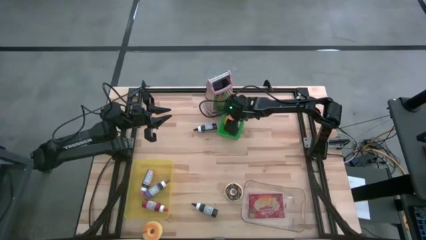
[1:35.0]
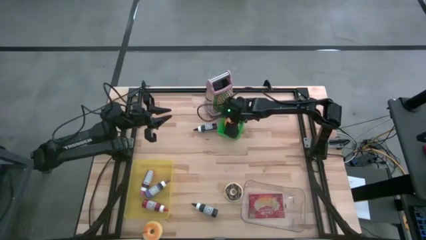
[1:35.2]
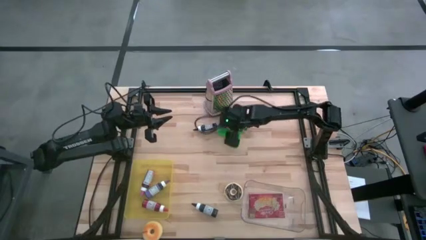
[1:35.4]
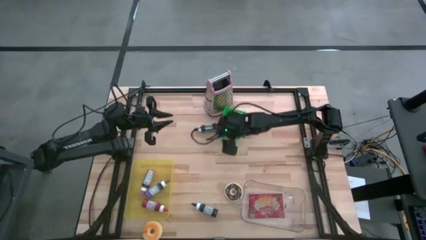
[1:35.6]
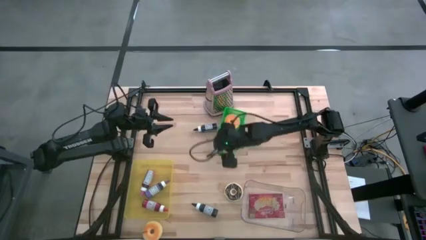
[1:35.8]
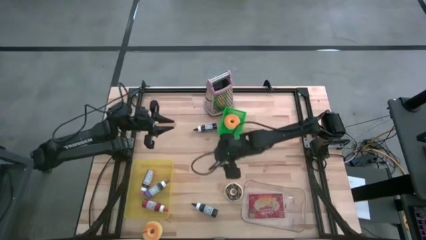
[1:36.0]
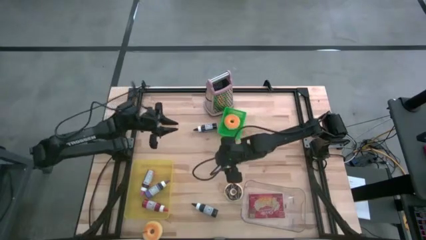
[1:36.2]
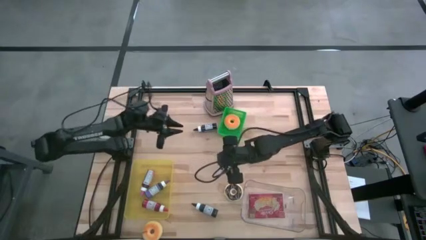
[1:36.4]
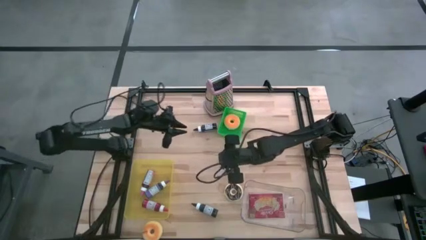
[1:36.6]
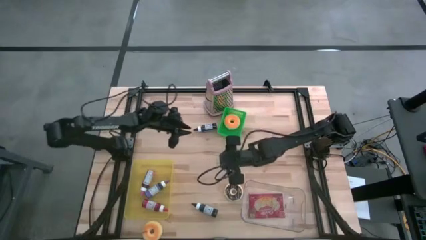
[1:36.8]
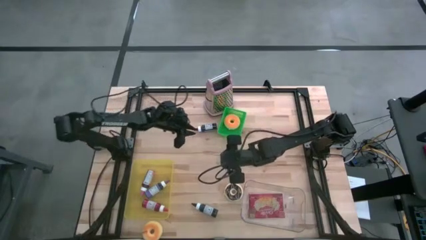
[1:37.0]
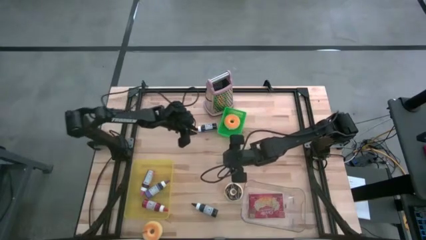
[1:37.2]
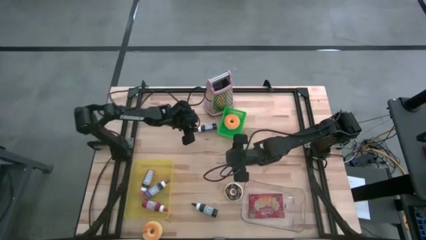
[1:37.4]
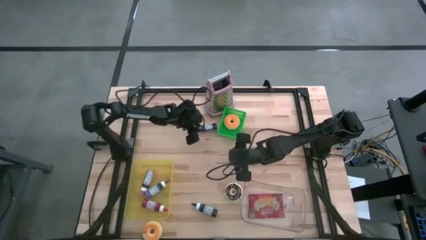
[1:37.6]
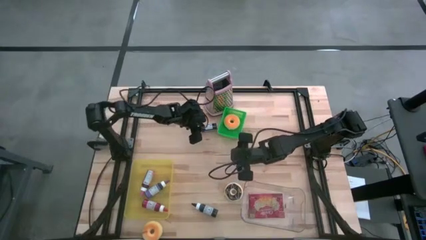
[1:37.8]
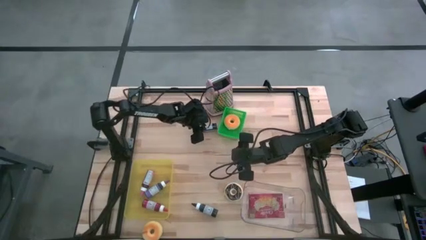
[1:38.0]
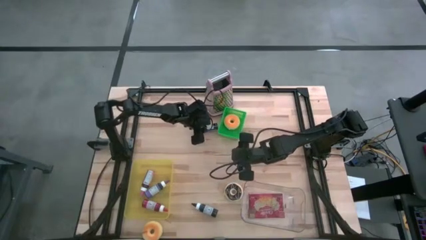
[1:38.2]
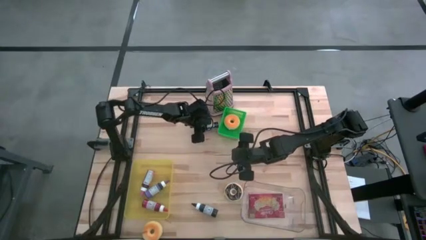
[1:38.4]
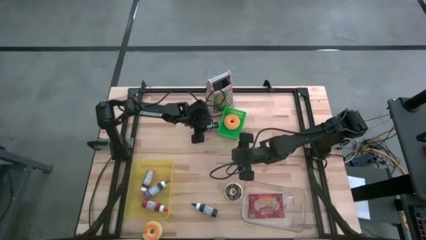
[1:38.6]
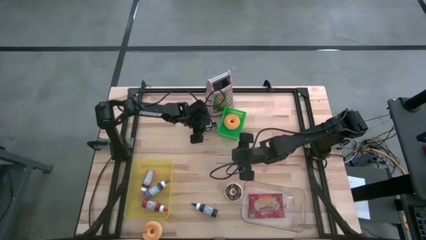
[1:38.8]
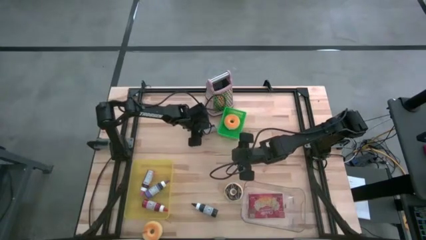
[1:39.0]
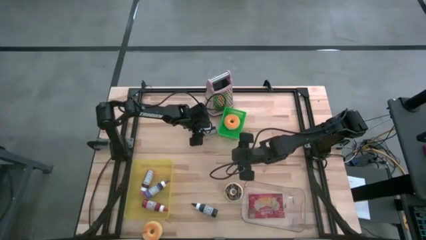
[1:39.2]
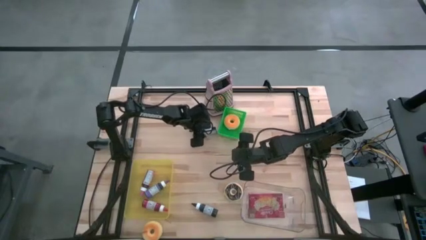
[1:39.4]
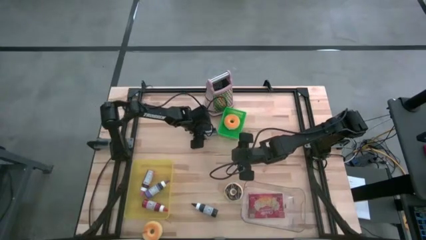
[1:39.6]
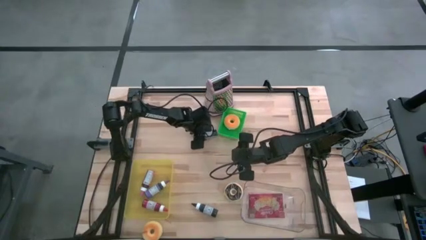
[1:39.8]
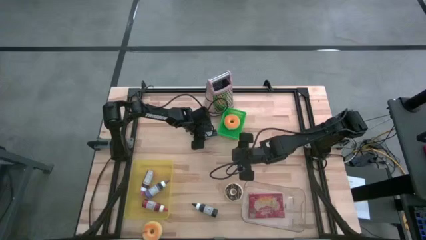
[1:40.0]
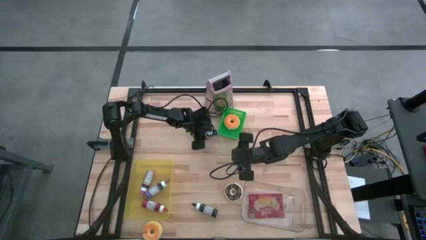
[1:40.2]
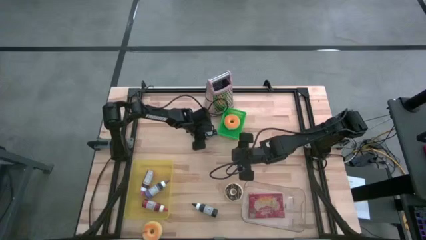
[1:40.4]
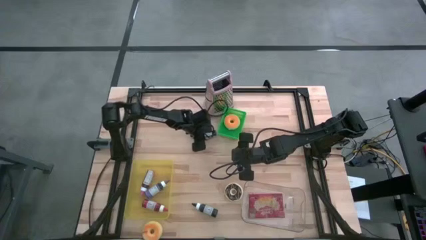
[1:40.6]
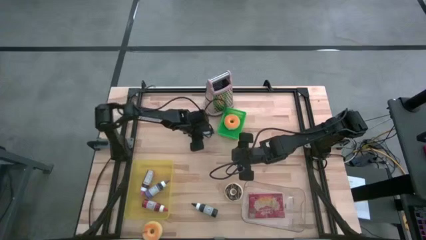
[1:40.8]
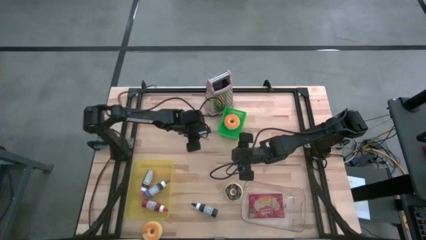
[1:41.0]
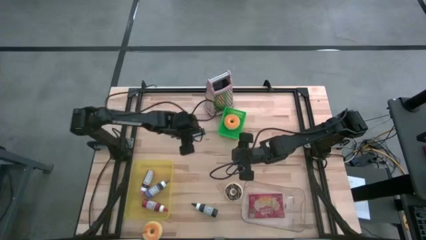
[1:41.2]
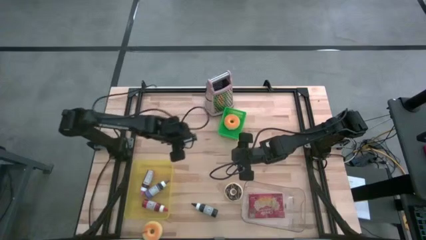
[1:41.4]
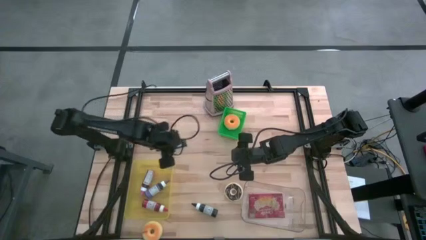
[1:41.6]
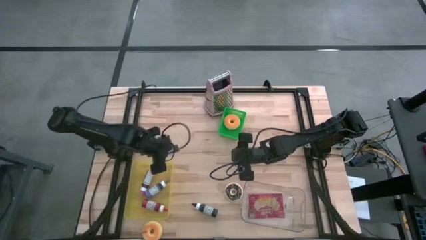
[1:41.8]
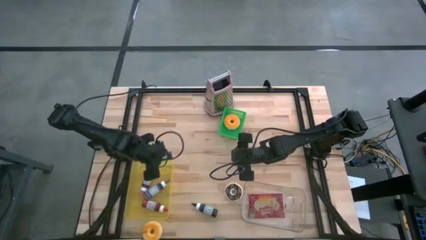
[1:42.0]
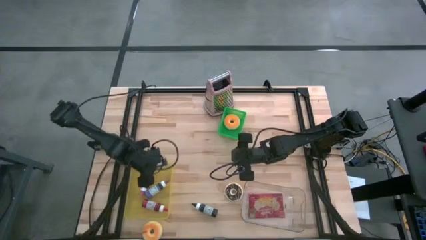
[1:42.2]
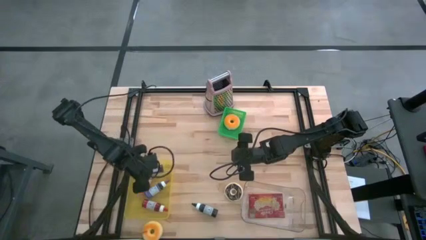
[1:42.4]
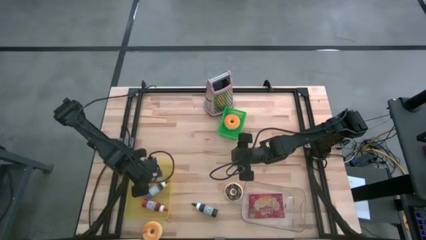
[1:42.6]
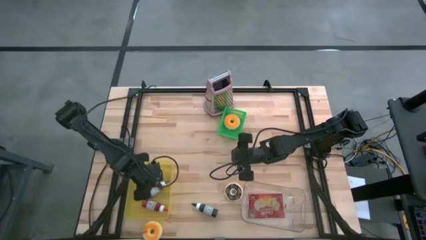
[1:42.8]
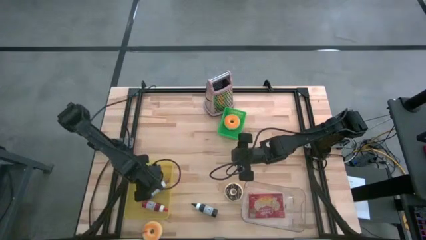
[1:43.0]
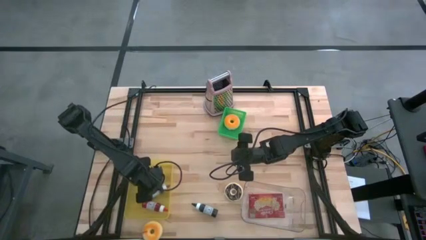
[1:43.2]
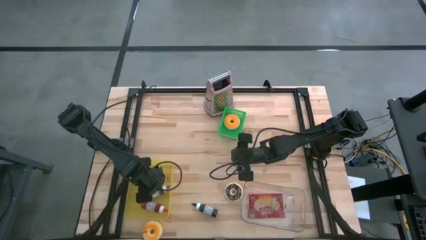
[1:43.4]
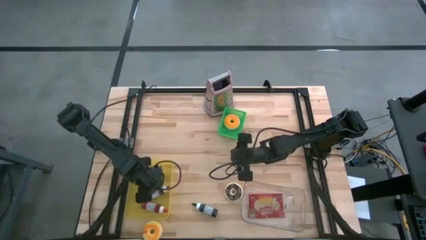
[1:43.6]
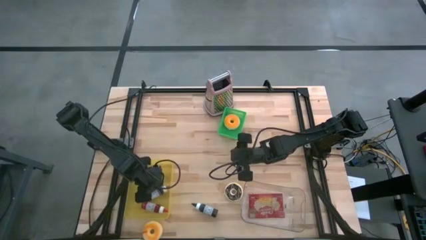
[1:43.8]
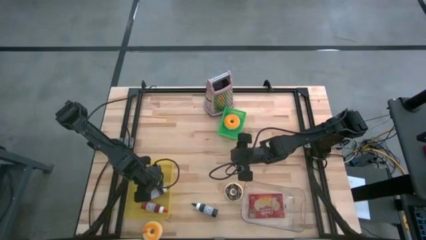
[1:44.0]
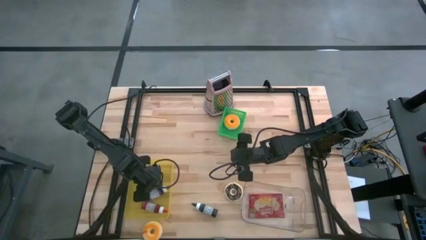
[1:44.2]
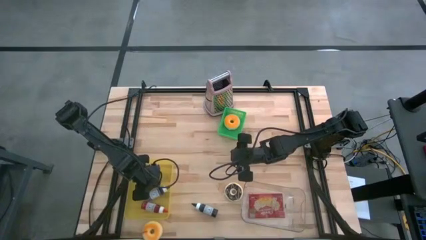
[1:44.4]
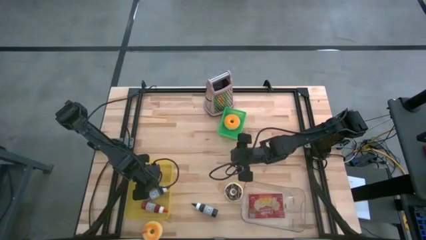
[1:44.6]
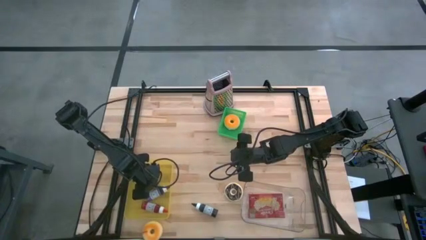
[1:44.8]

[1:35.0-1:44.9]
Task: Pick & Place Food Item
Put the black ink bottle into the yellow bin

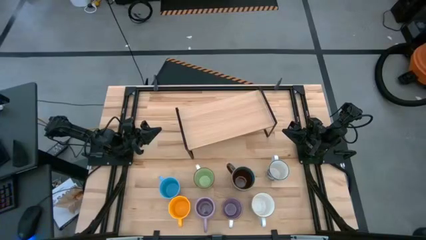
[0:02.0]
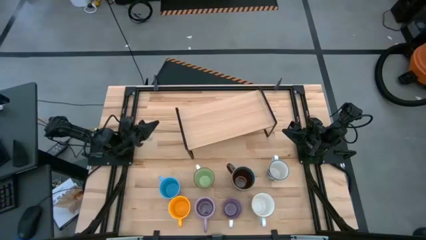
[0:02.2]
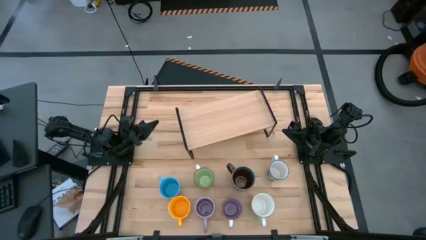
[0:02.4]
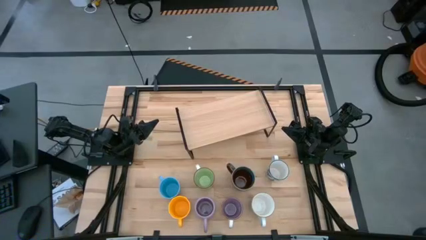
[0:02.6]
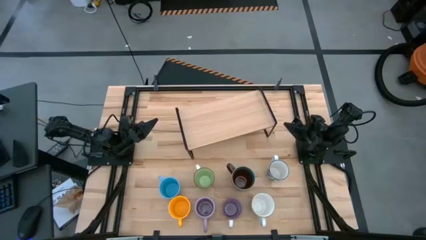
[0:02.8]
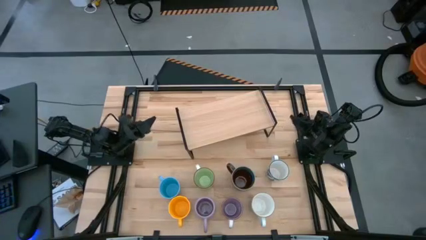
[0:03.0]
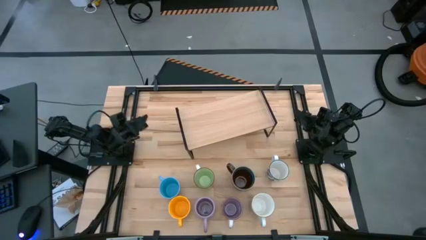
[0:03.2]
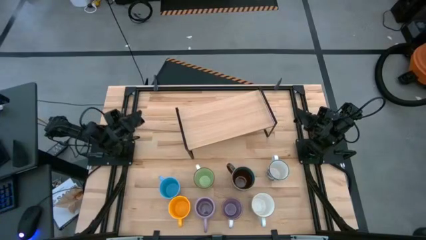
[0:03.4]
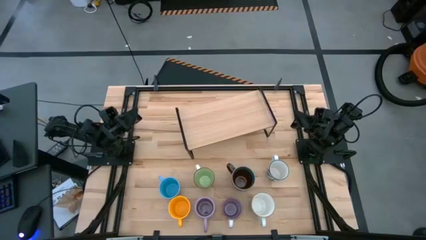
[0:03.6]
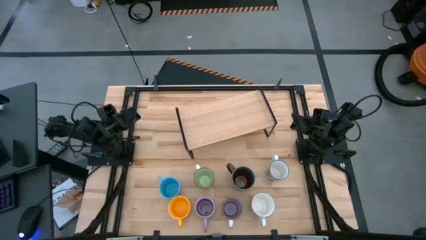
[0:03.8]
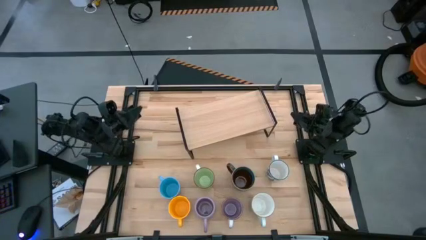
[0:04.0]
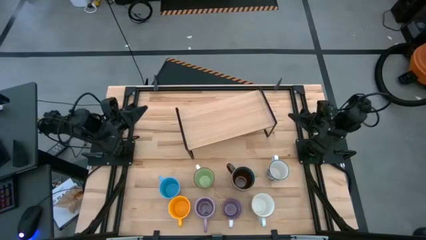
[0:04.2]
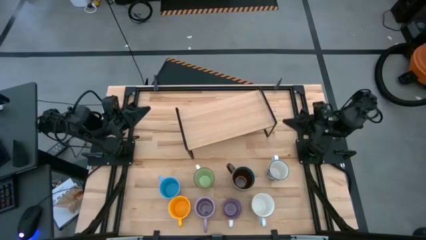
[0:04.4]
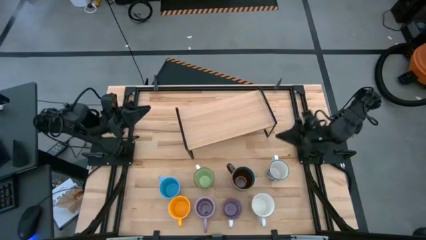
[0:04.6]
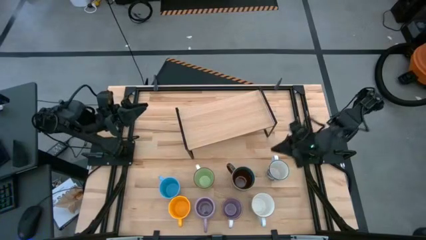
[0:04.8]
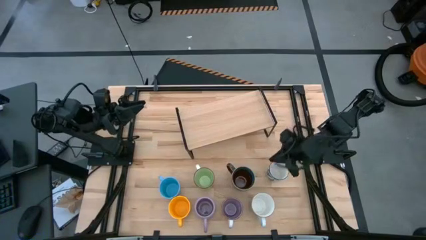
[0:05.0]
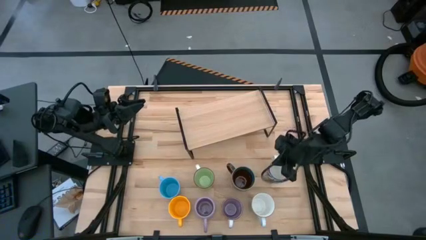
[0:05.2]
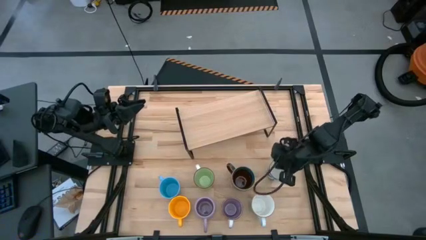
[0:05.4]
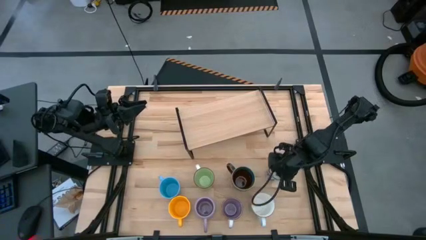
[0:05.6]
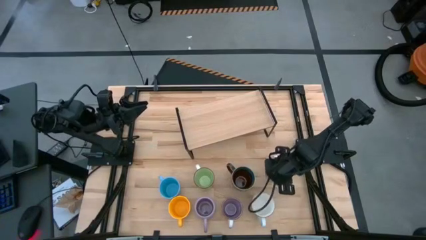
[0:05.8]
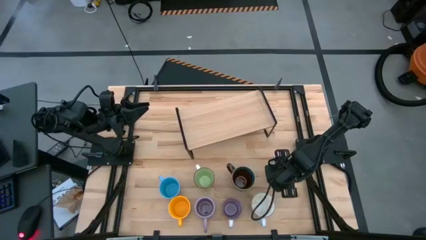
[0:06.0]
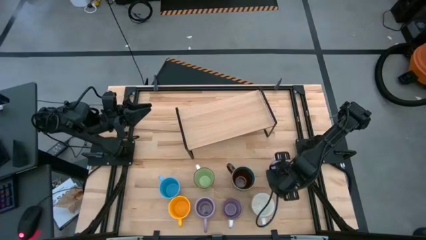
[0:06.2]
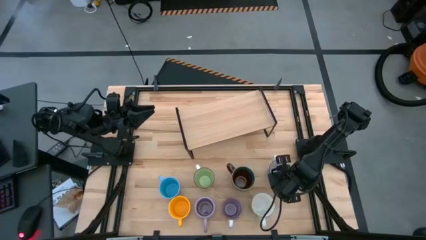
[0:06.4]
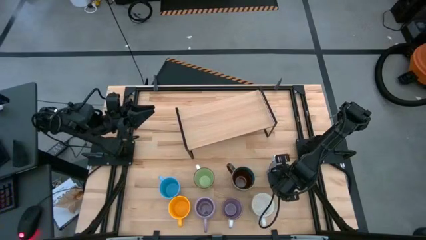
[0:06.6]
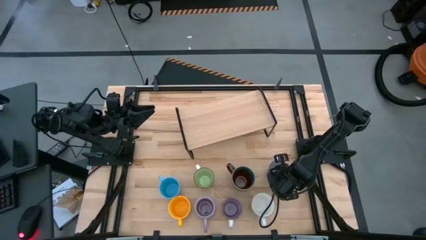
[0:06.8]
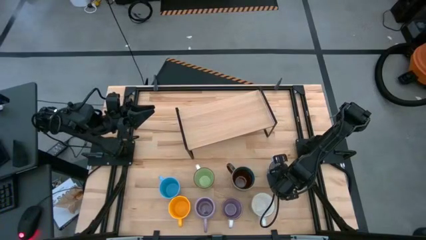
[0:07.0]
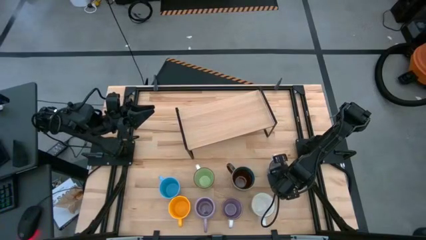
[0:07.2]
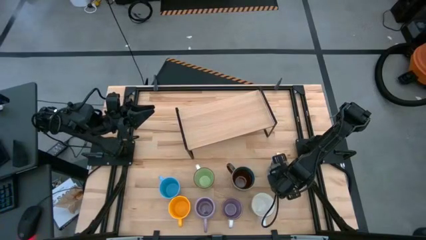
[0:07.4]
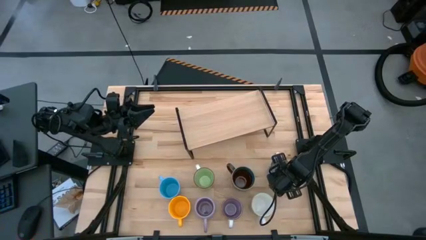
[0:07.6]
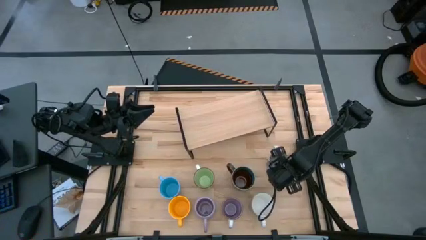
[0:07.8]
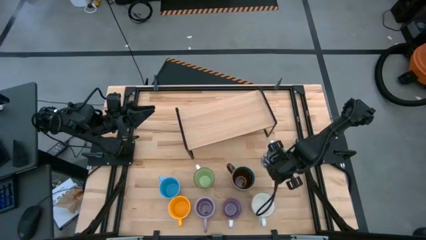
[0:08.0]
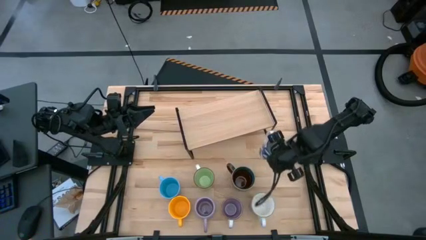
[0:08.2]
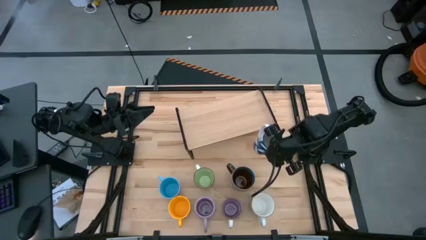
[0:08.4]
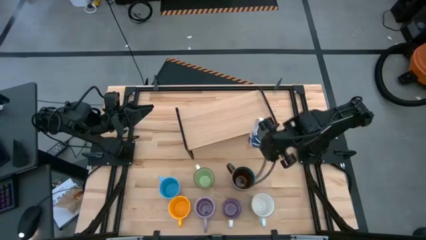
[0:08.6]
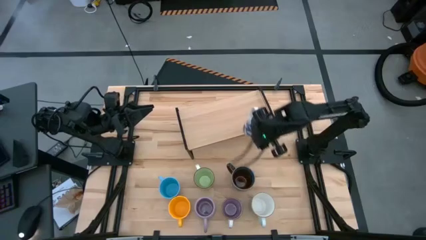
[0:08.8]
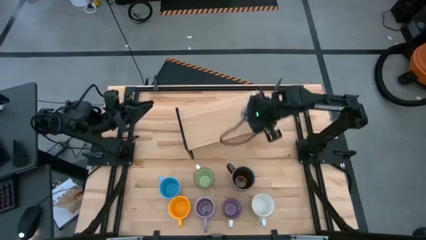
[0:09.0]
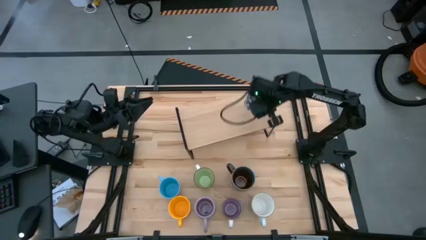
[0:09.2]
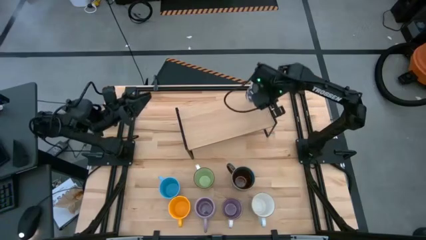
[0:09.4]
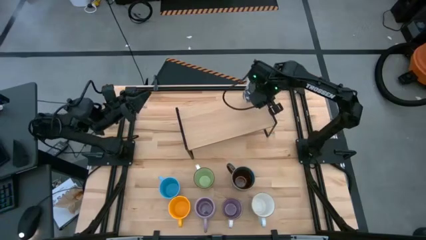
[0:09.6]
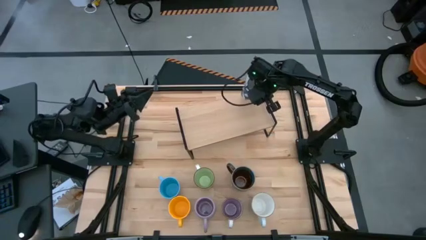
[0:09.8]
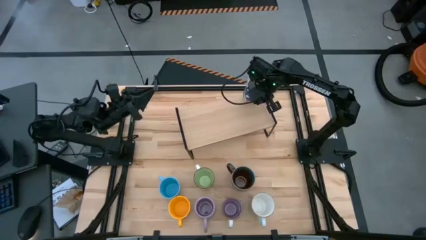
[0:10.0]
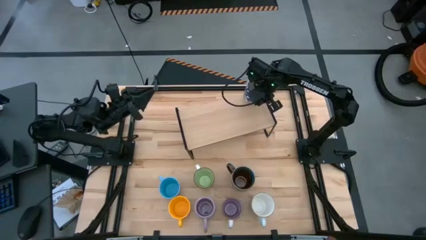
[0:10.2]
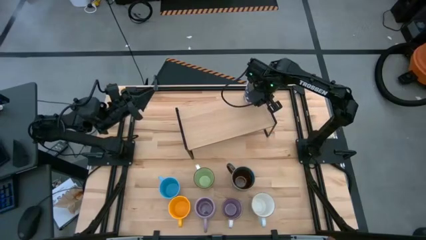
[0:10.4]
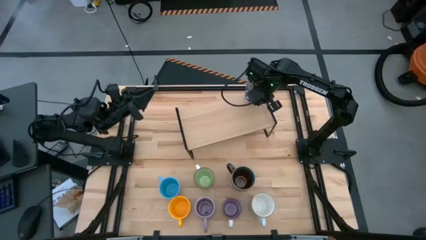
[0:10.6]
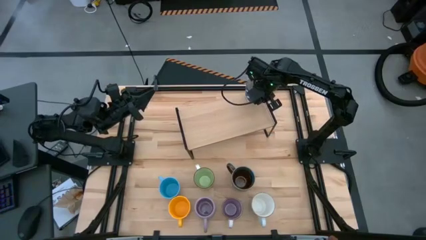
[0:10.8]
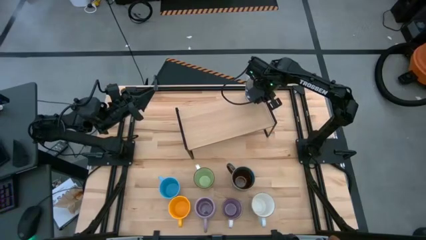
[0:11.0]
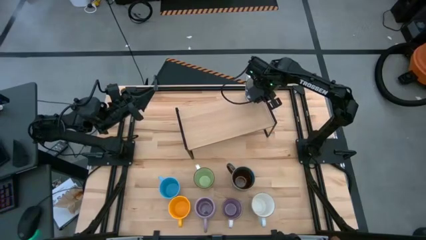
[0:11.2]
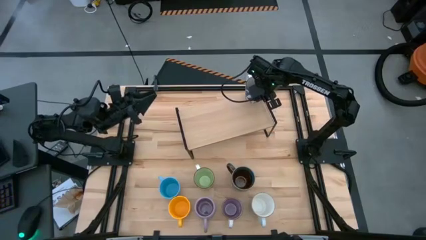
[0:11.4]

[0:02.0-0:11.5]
Task: Place coffee mugs
Put the blue patterned mug on the shelf
